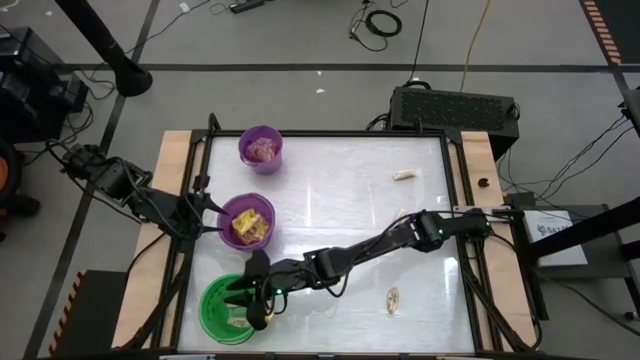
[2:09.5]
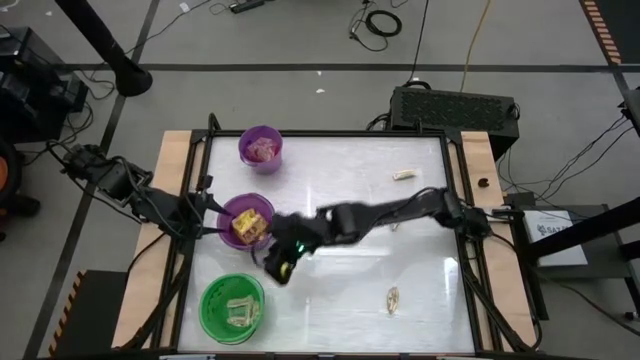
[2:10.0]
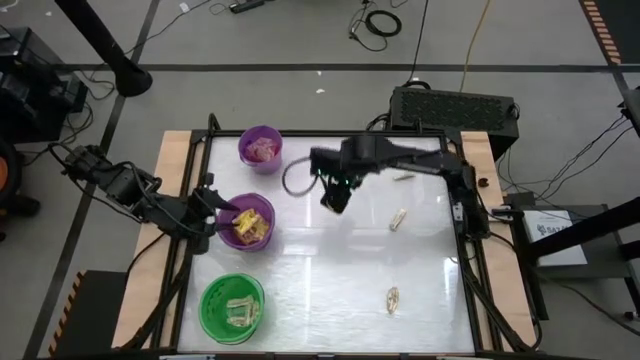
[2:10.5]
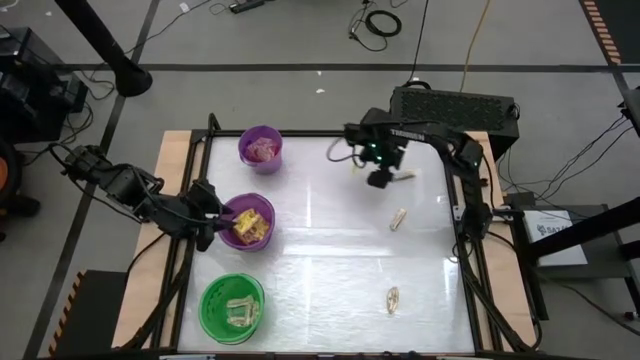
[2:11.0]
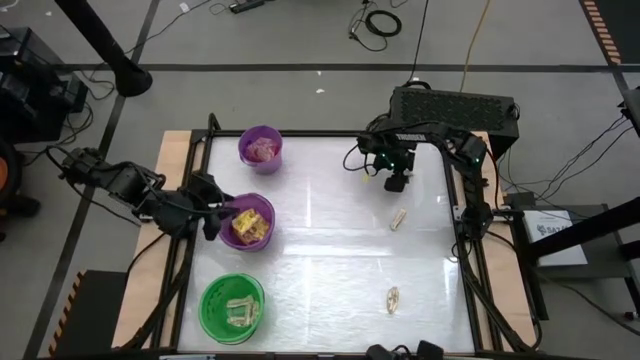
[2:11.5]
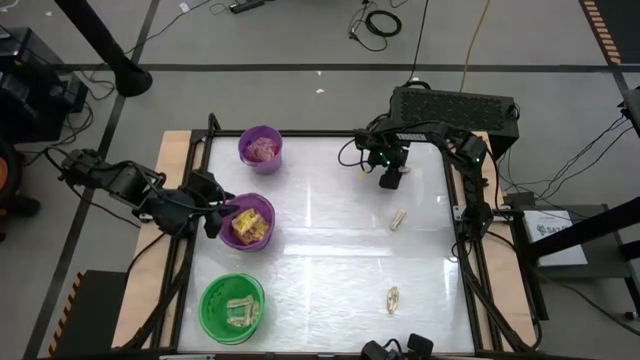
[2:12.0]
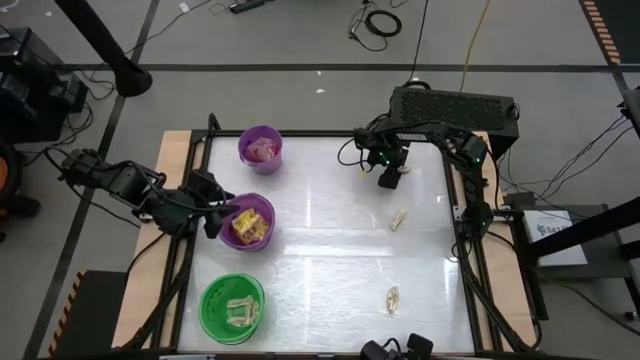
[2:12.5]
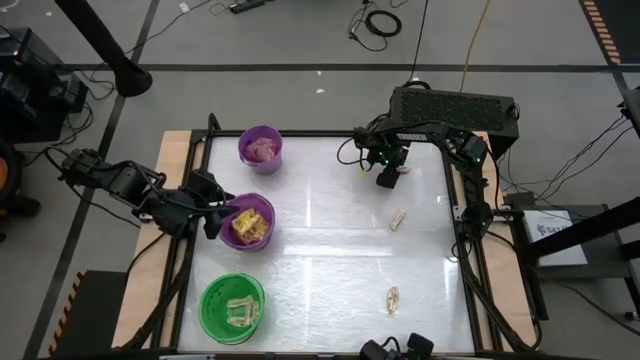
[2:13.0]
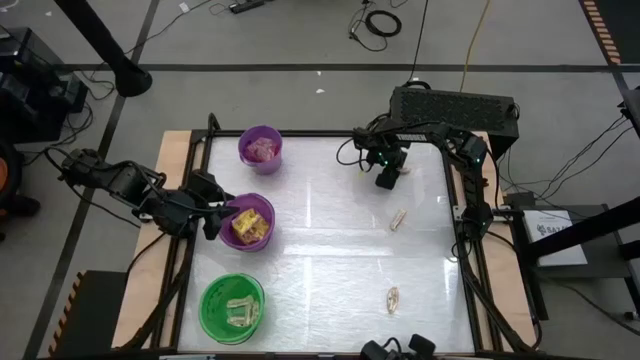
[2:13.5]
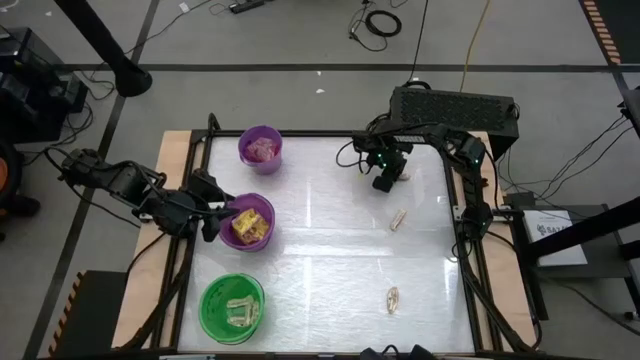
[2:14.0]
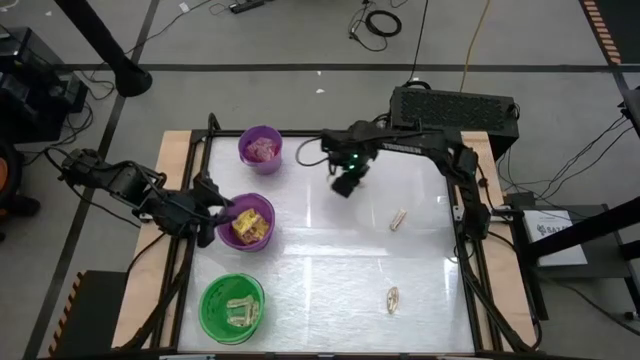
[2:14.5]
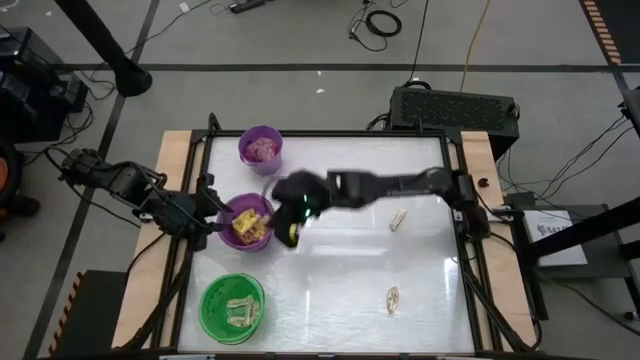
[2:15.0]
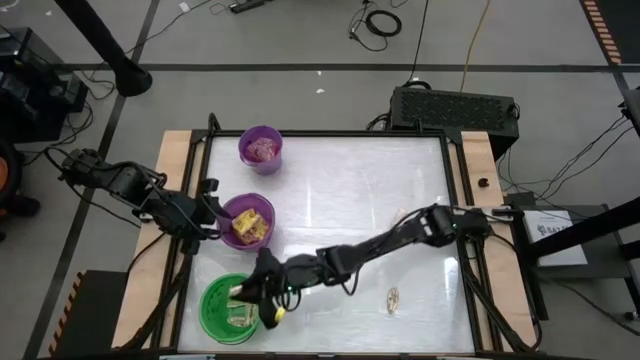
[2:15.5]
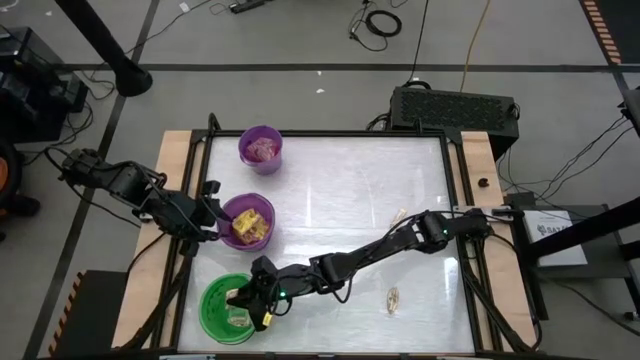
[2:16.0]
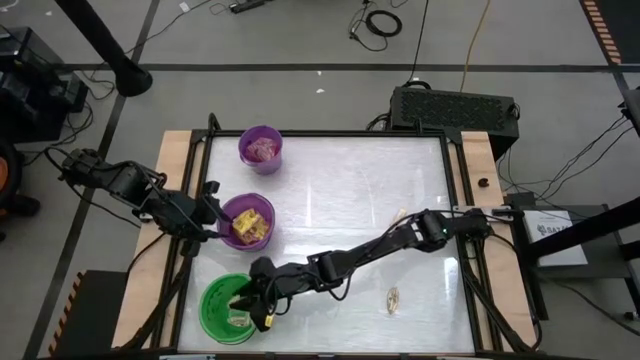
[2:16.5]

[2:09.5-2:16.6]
Task: Sort candy by brand, put in halloween buckets
Put the white candy into the green bucket

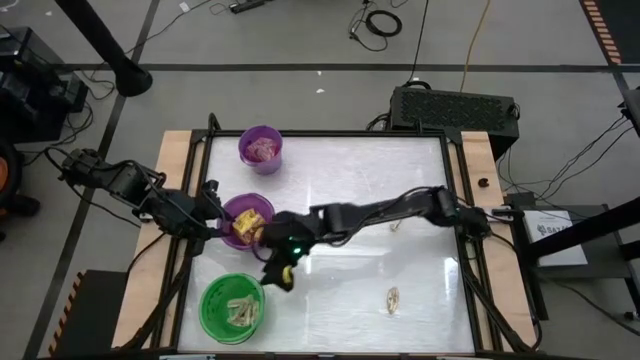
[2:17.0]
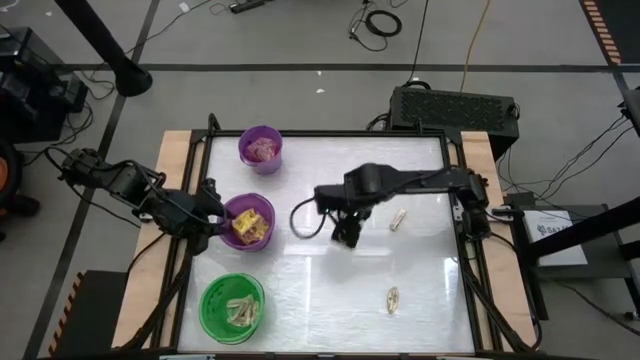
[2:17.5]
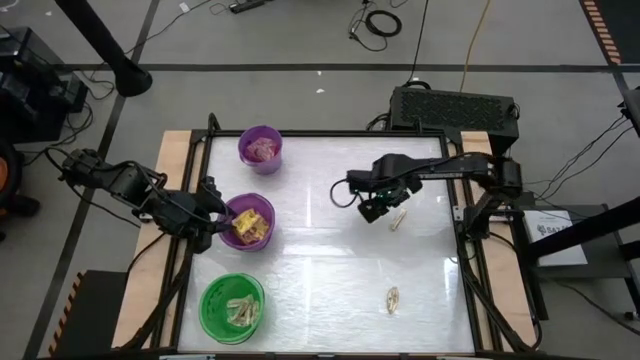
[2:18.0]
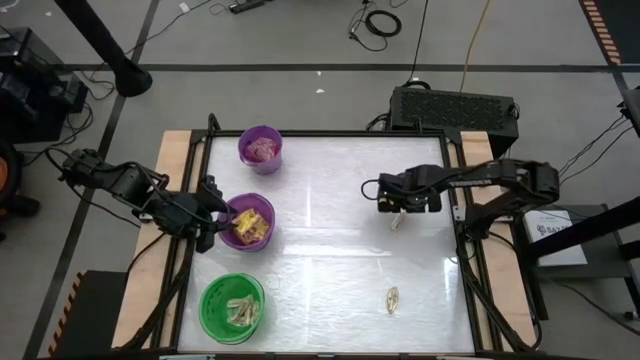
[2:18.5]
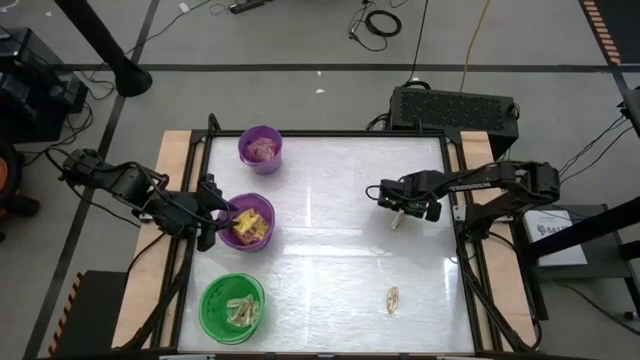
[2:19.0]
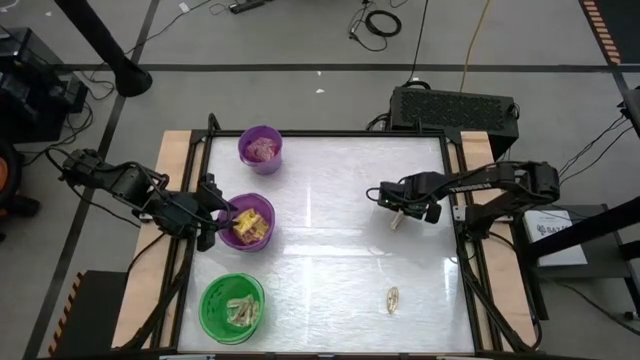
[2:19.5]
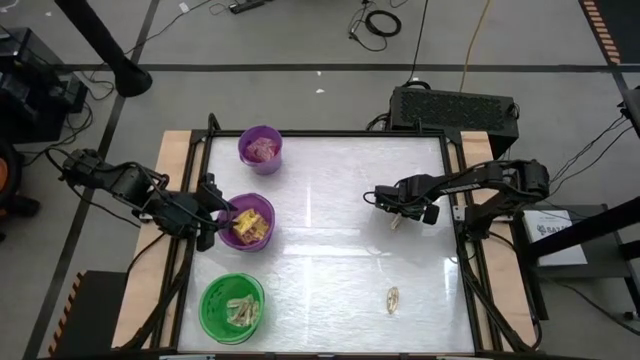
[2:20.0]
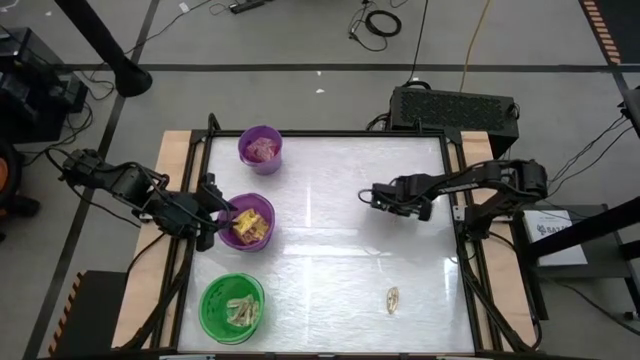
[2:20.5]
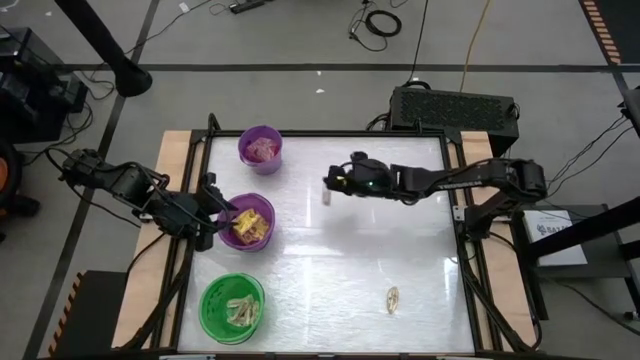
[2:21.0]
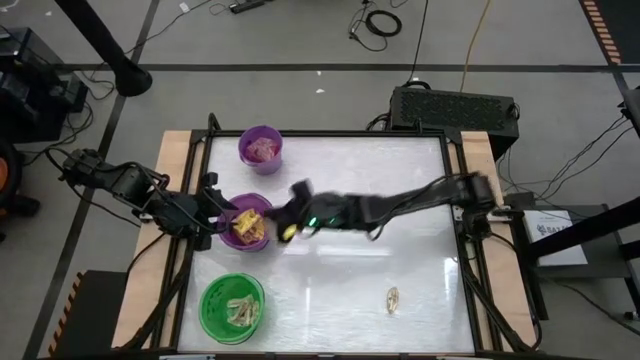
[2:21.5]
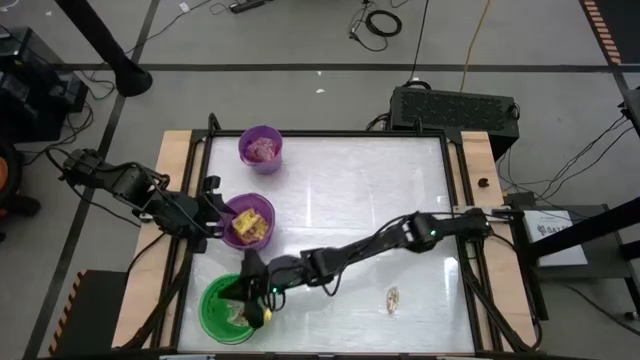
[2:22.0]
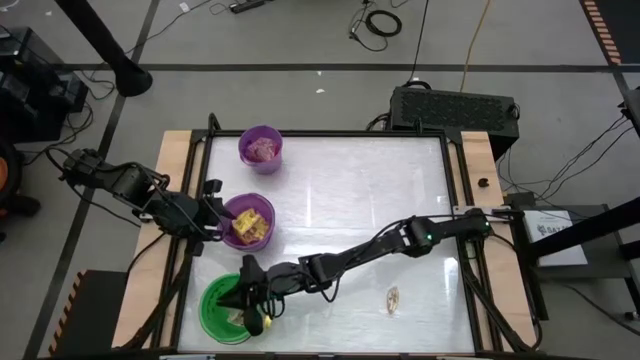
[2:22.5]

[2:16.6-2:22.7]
Put the white candy into the green bucket

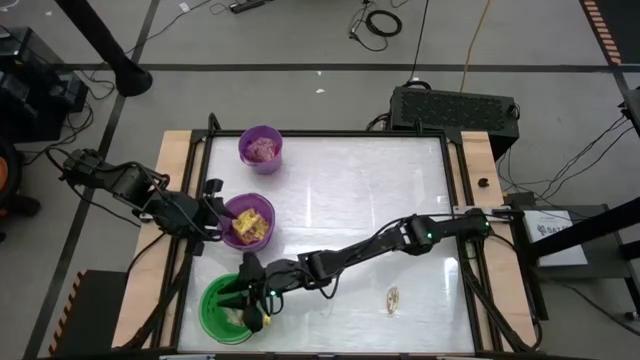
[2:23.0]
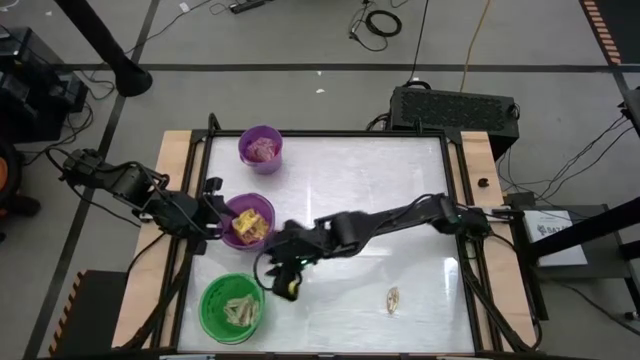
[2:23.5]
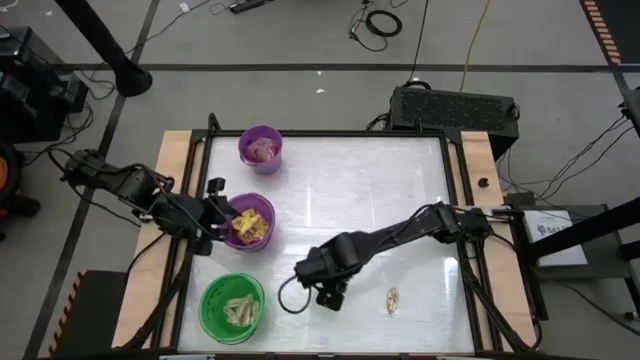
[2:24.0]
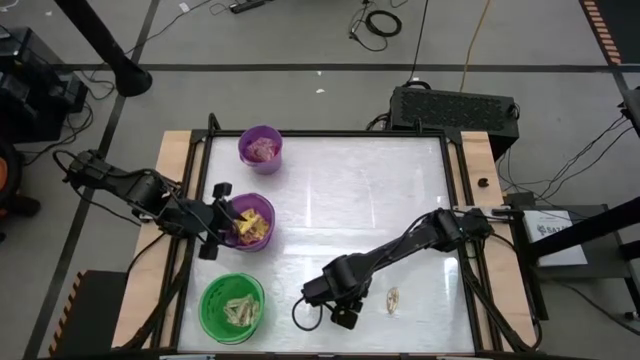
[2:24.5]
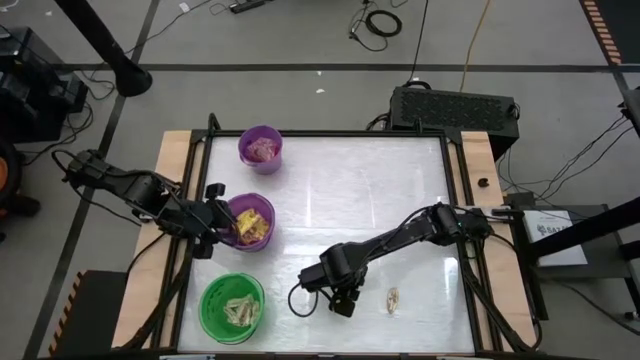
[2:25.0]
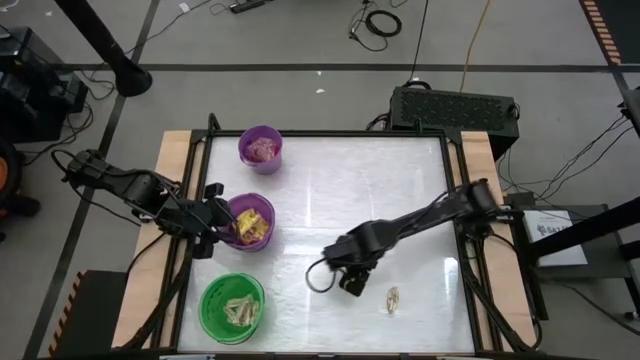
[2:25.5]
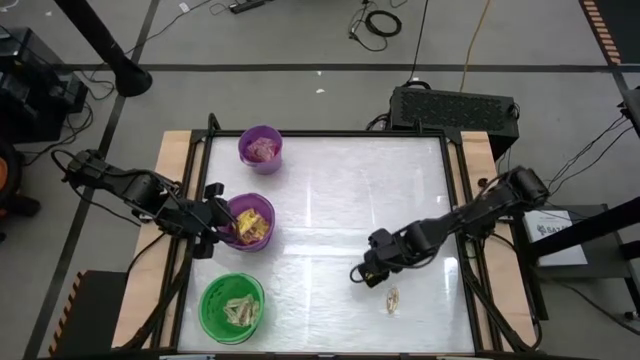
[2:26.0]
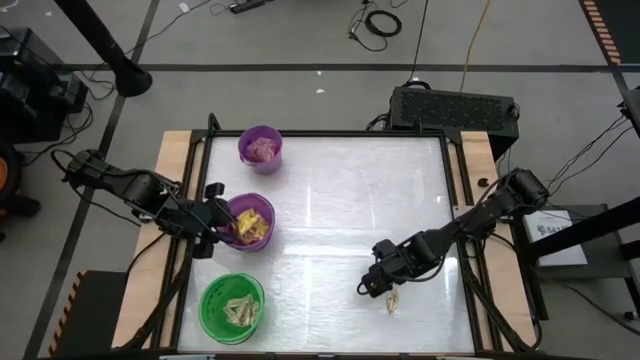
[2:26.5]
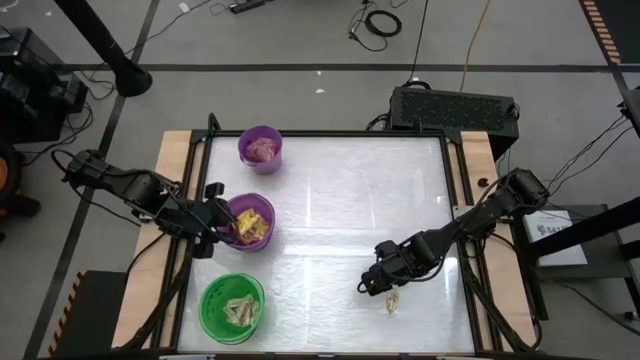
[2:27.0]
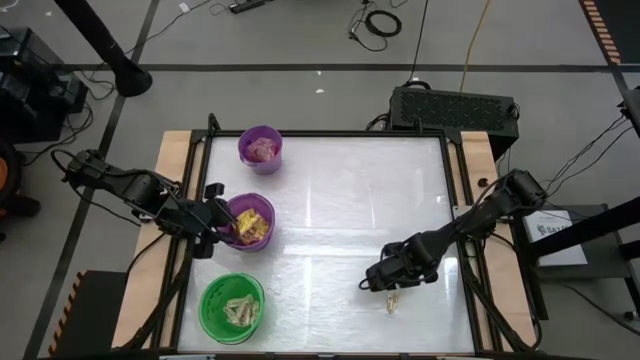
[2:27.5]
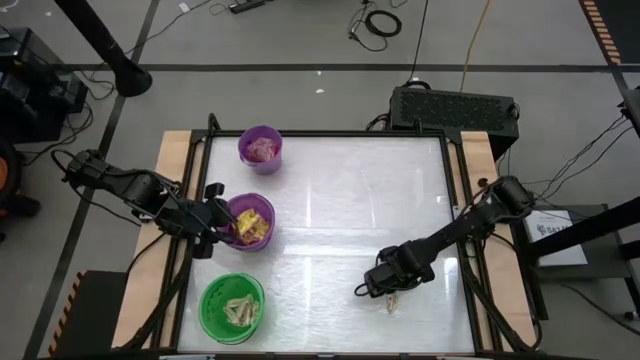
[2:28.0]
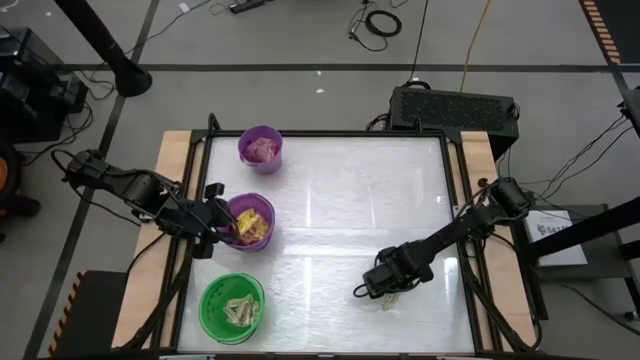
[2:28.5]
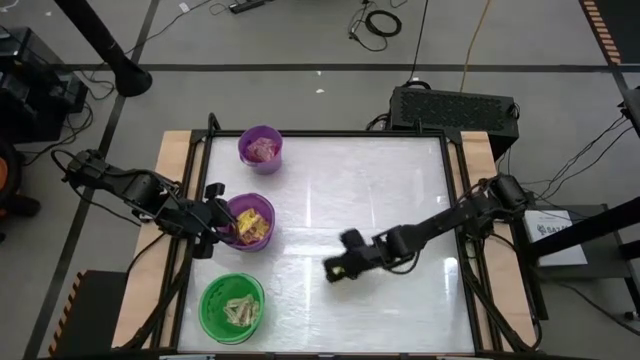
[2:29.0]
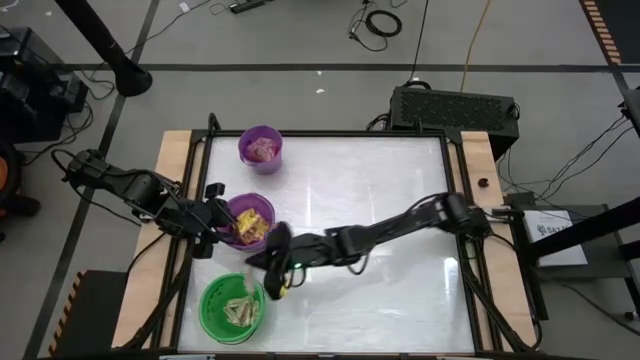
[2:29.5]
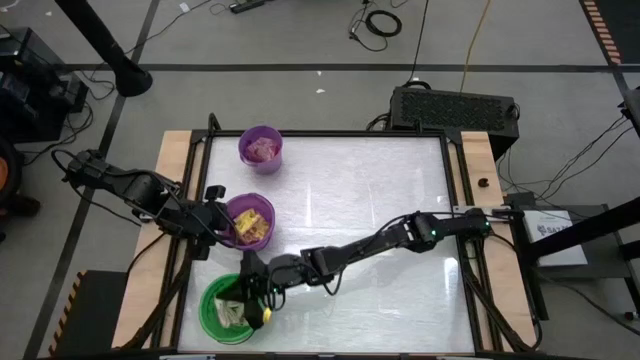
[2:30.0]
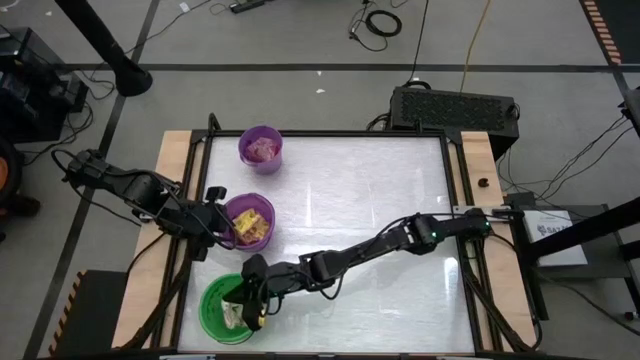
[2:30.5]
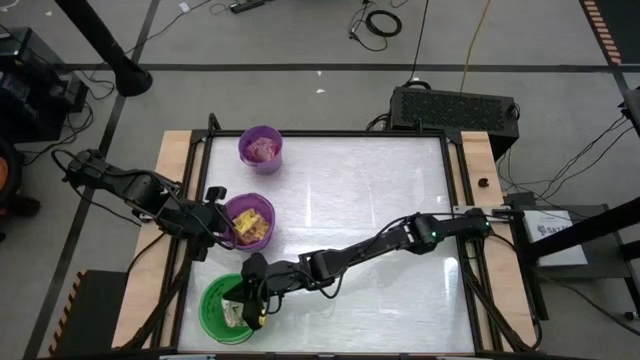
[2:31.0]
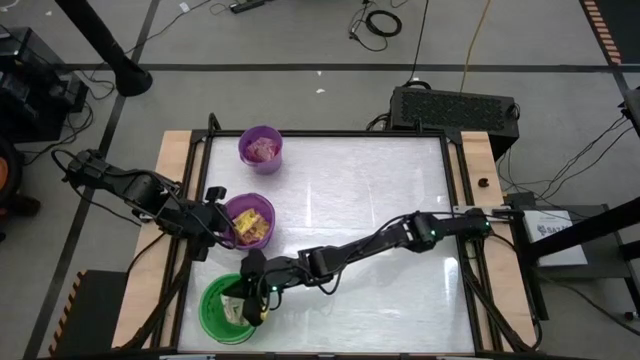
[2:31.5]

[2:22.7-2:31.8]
Put the white candy into the green bucket
